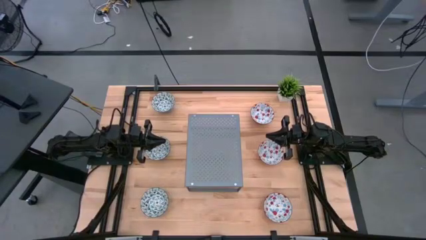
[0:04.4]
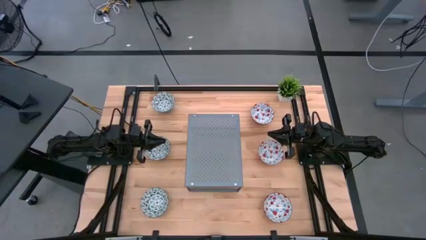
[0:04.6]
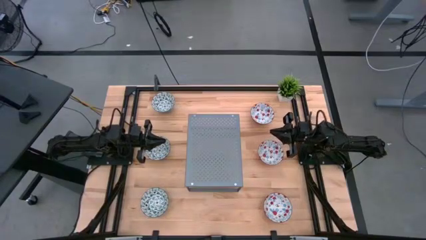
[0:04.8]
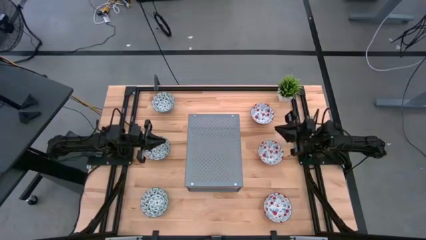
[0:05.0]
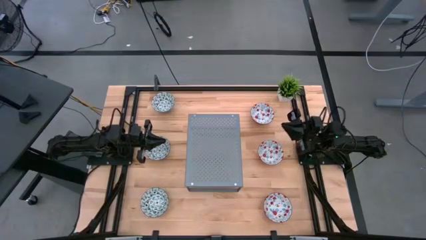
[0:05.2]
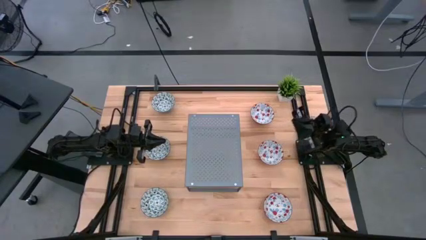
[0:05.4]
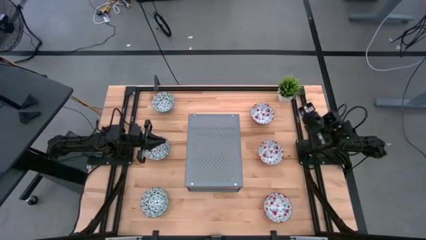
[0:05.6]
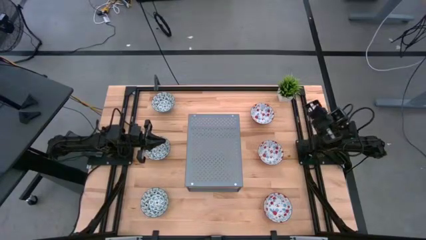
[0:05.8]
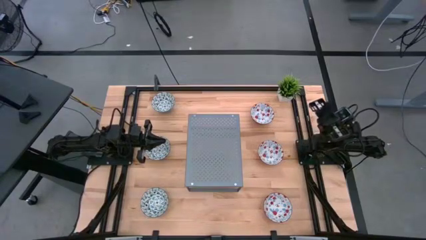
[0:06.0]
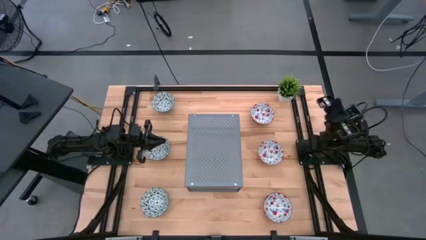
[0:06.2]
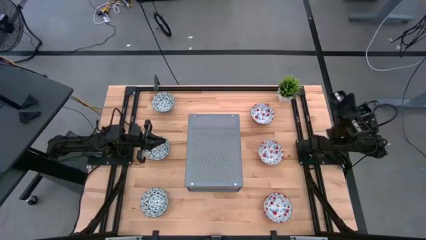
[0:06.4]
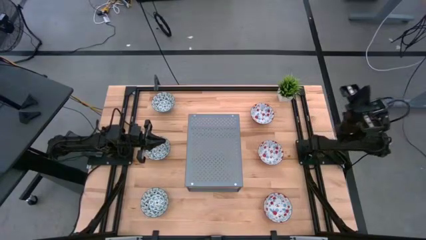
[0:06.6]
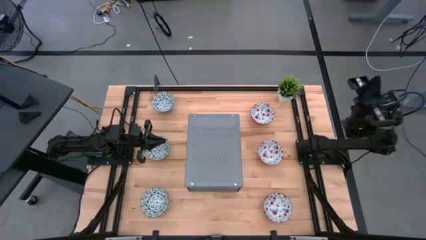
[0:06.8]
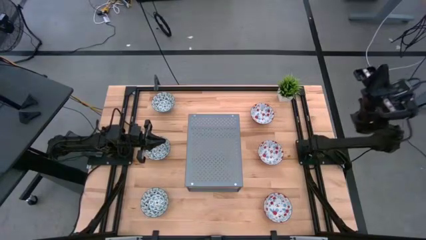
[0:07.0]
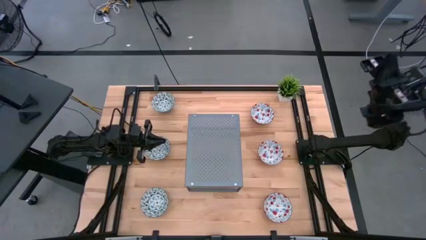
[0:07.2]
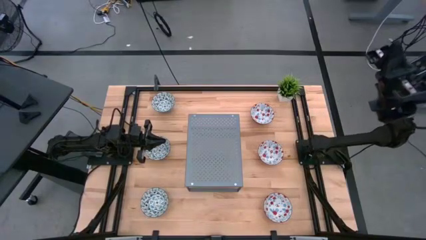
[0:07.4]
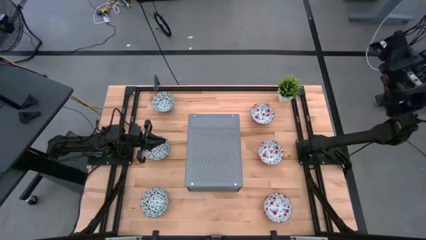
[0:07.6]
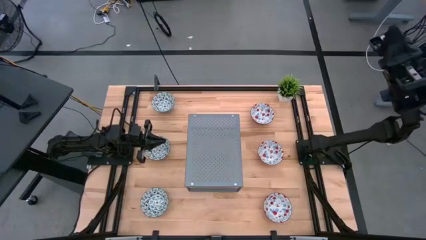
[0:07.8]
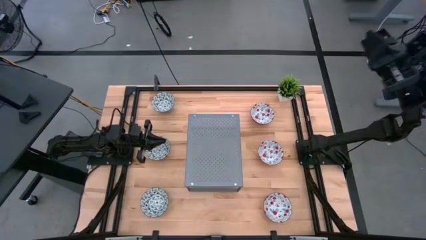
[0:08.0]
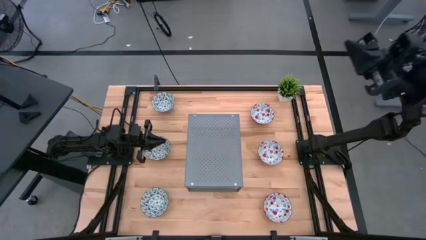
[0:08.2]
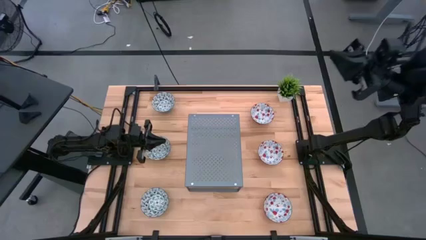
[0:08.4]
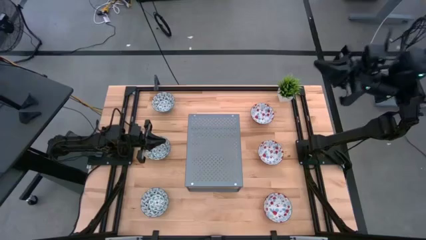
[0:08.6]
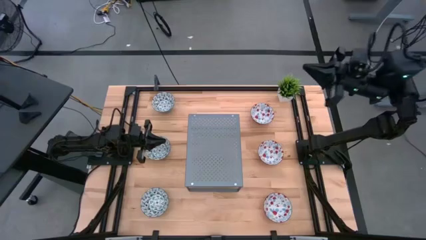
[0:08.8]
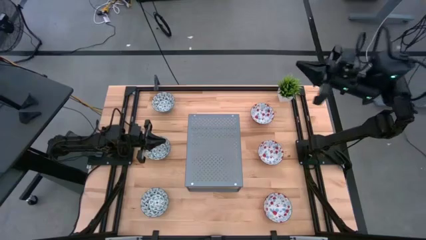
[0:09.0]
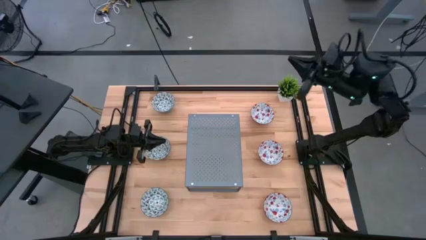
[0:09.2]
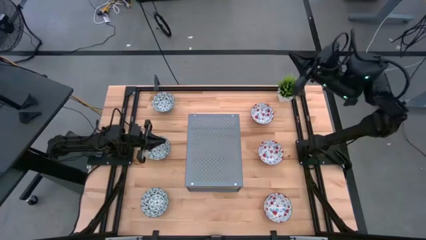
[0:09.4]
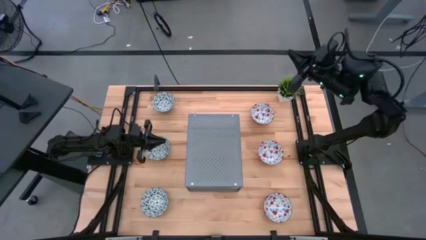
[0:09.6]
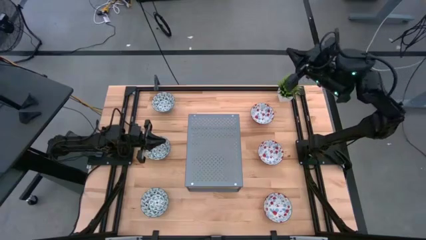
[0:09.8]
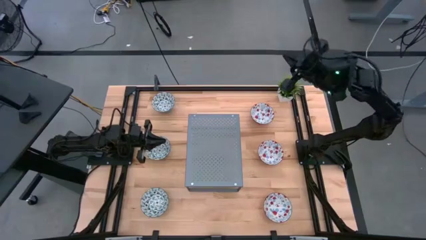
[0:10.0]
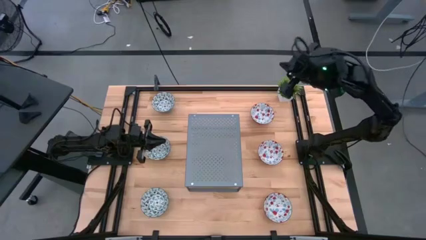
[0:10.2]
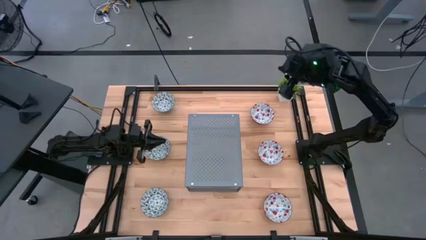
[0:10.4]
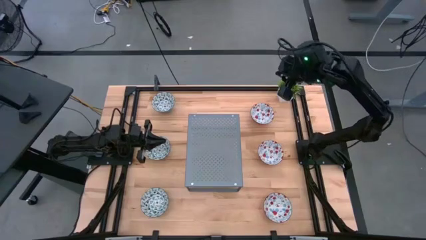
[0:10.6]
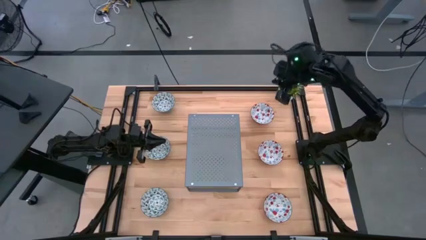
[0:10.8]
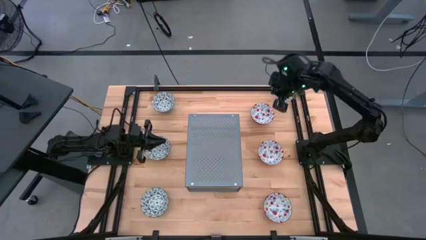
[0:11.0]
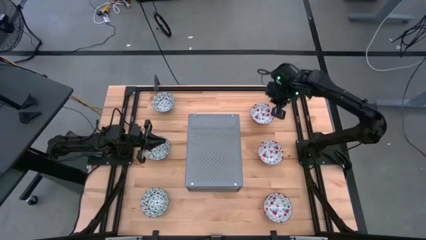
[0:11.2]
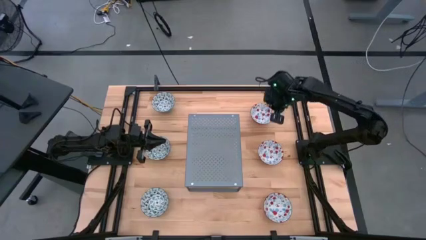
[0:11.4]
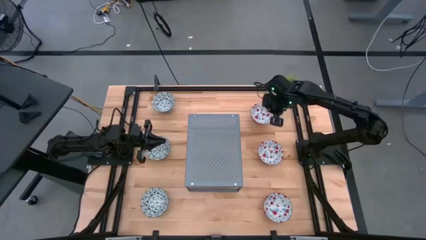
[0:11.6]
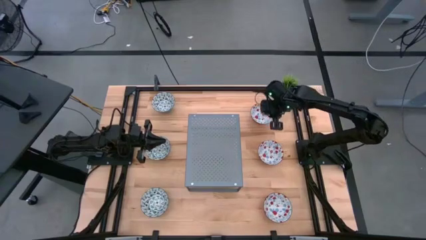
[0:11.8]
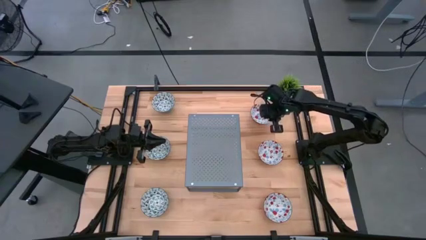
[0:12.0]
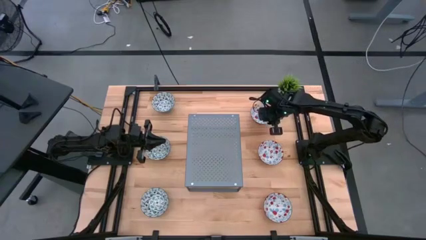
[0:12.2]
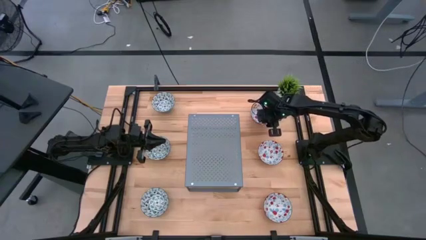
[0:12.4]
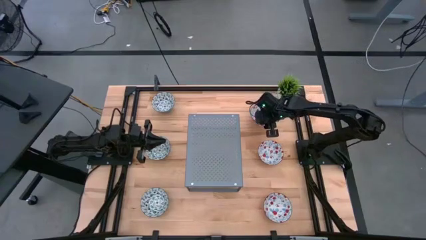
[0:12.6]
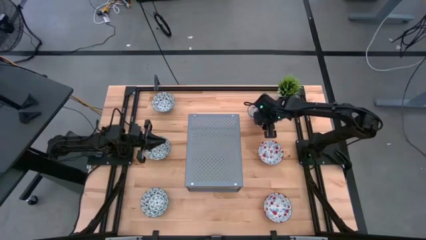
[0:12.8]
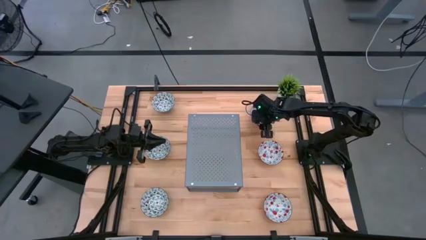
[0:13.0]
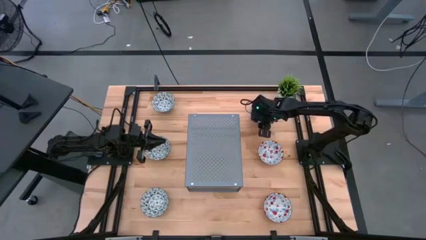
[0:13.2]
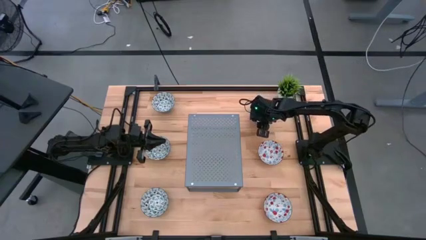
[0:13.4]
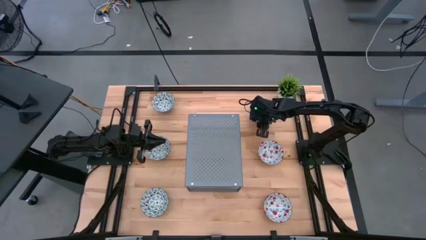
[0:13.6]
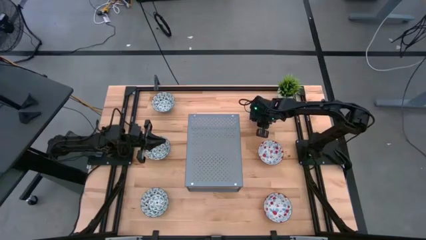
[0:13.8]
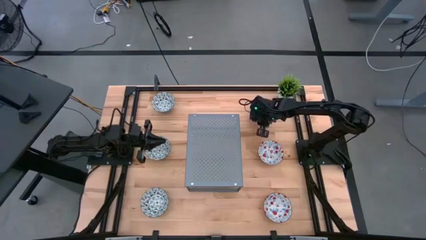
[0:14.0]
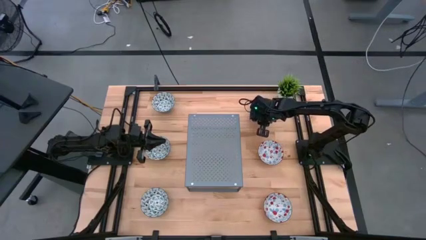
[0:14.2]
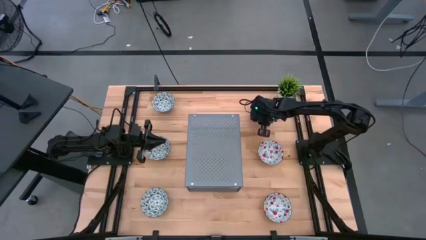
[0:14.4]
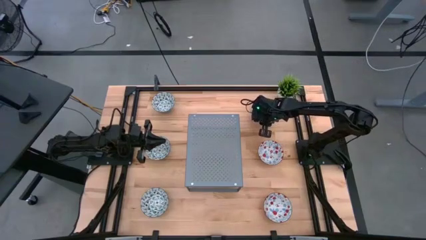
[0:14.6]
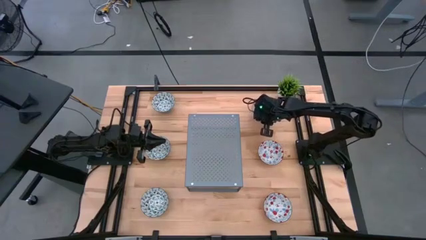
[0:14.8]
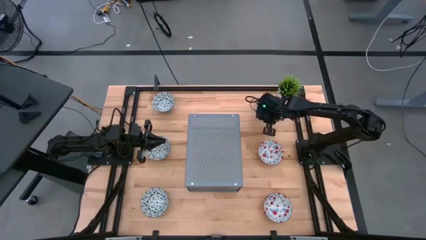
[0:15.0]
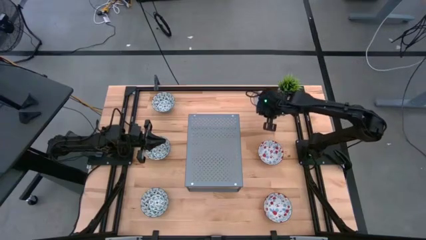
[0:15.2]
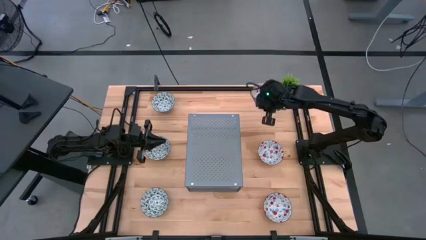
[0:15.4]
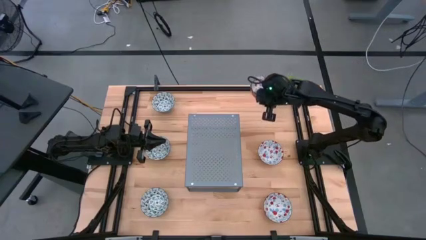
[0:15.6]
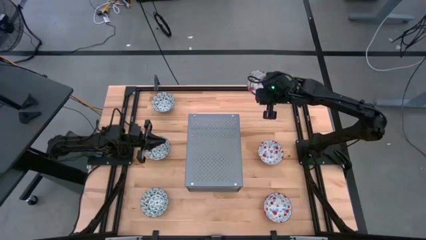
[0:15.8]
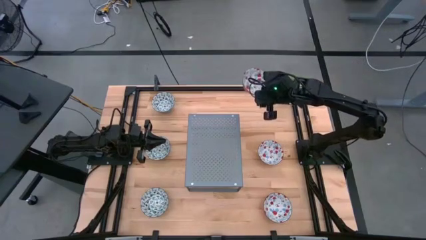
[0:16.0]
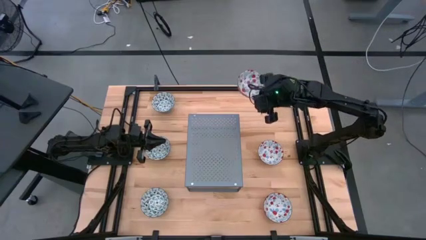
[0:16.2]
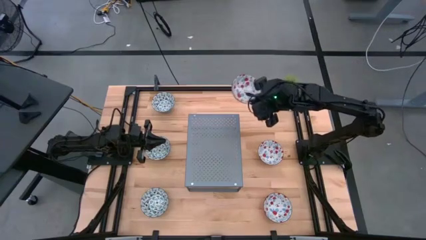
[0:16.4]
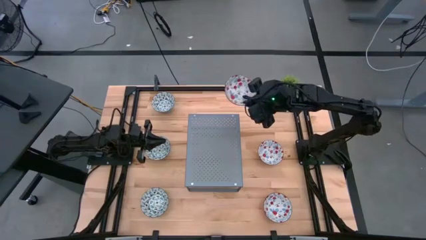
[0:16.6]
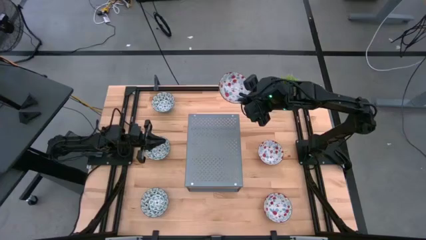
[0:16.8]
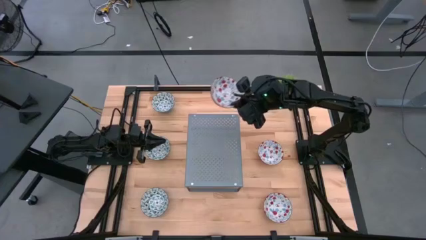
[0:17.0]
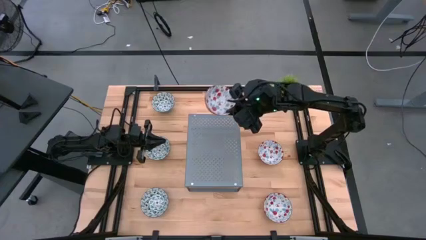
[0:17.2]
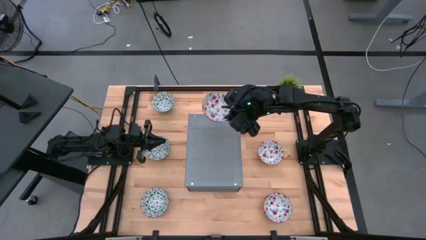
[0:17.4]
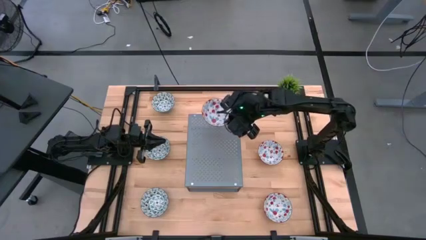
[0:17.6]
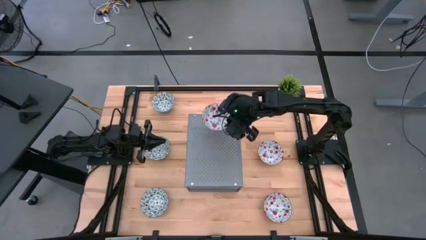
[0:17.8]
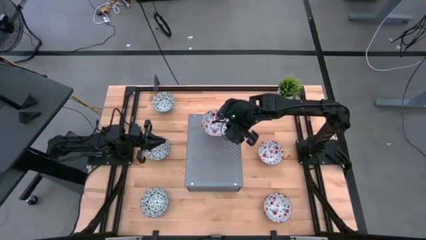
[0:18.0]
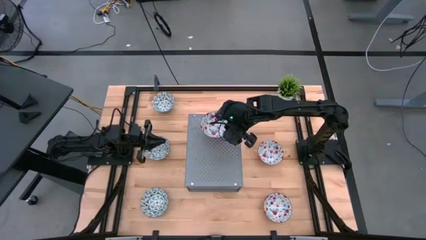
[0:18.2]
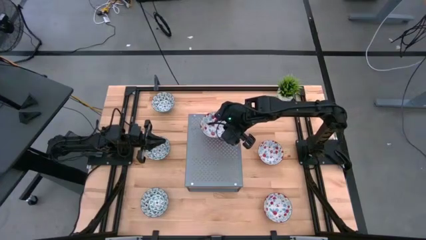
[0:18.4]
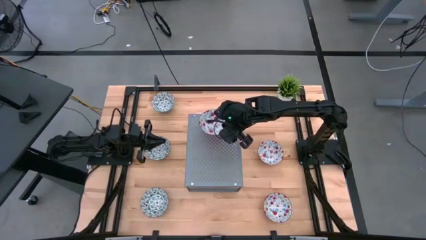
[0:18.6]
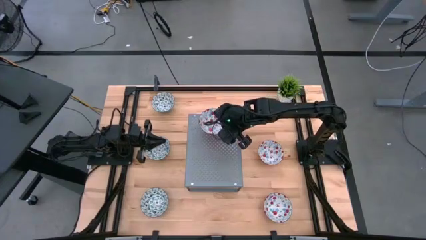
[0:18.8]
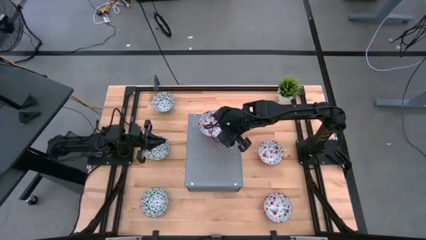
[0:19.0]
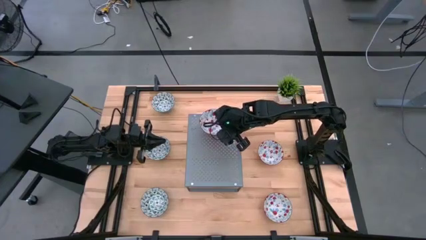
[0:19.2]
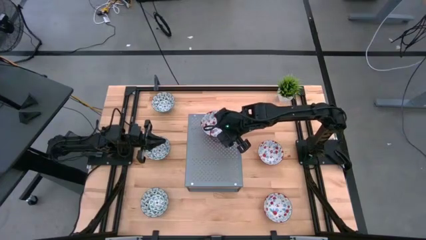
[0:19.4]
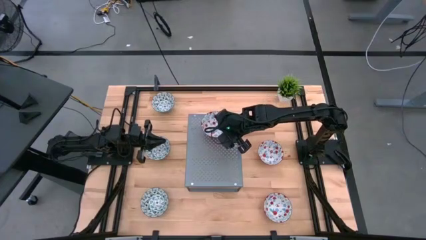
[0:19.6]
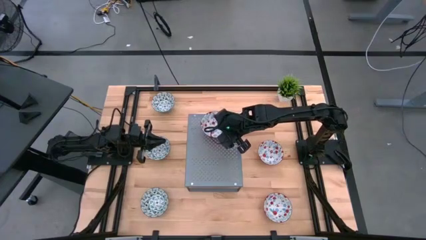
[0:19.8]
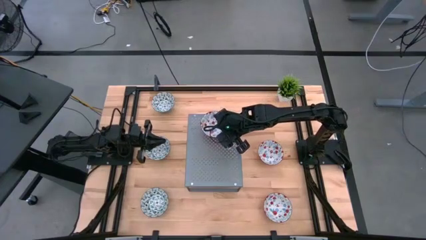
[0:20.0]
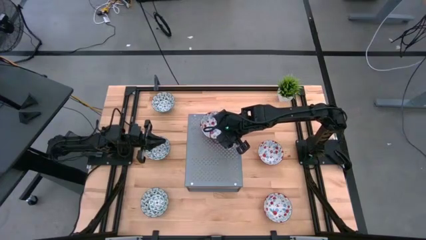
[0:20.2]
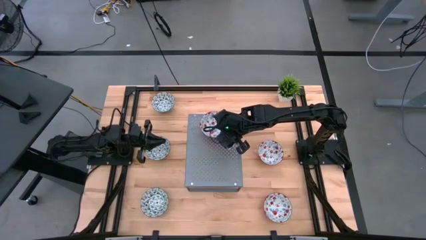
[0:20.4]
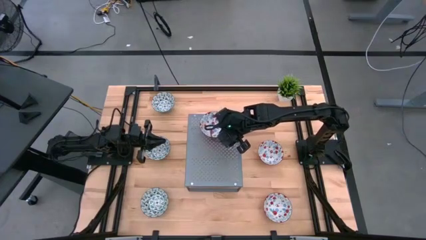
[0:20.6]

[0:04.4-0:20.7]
Task: Pick & Place Mini bowls
Put the top red bowl on the shelf
